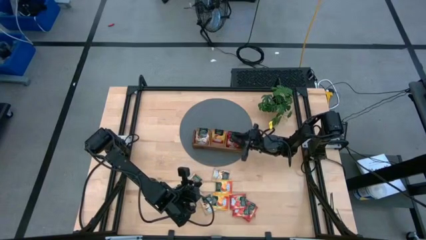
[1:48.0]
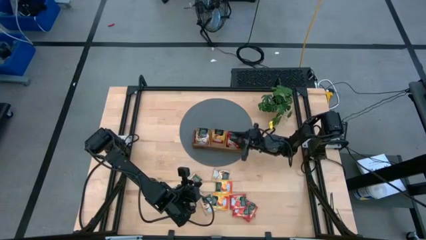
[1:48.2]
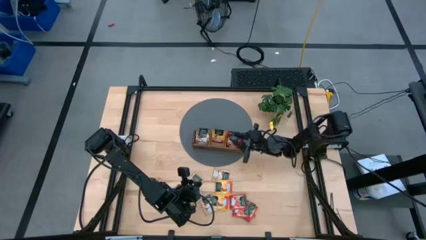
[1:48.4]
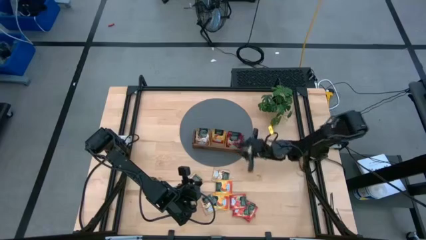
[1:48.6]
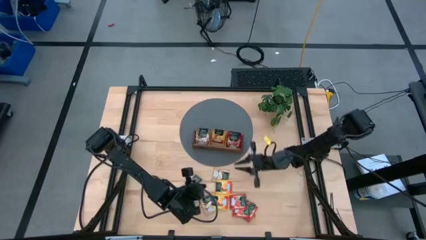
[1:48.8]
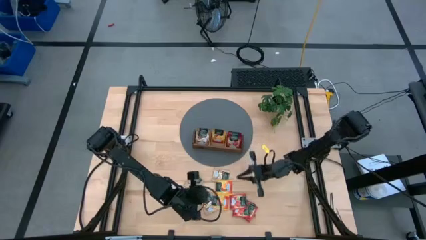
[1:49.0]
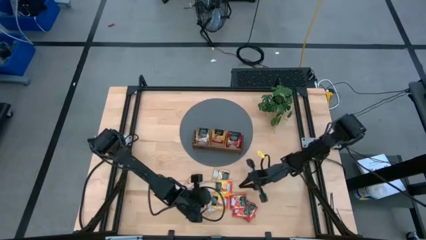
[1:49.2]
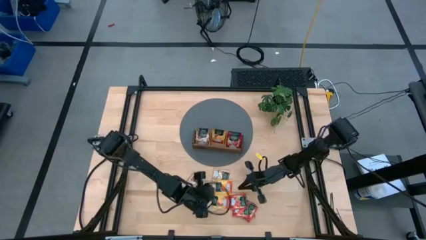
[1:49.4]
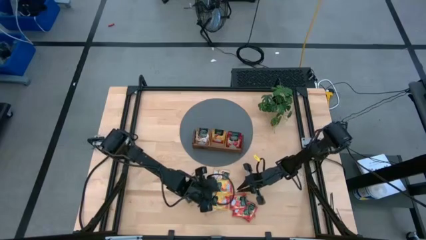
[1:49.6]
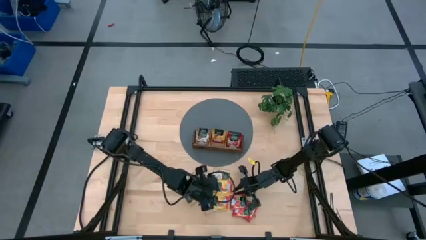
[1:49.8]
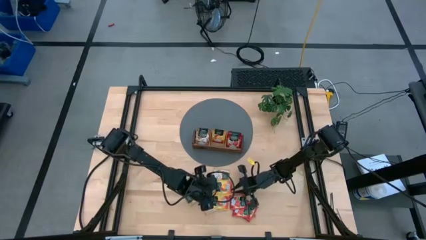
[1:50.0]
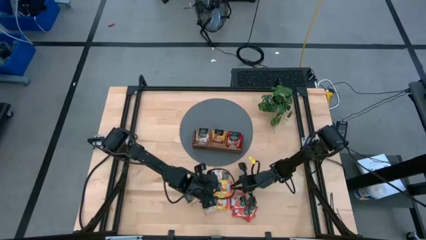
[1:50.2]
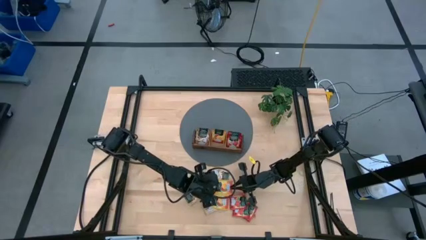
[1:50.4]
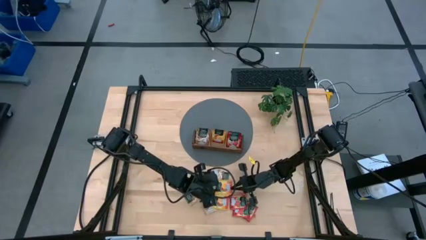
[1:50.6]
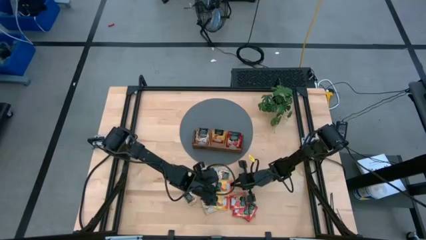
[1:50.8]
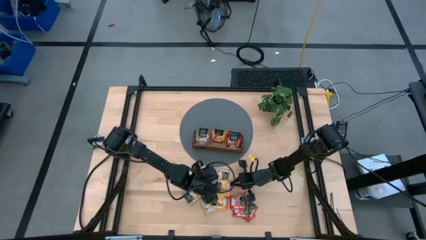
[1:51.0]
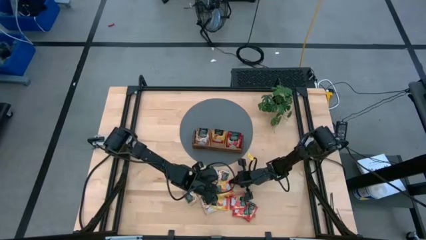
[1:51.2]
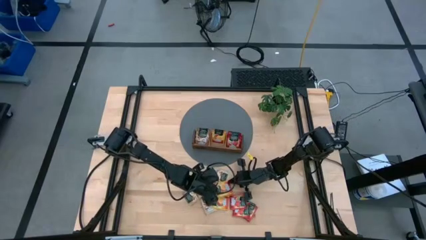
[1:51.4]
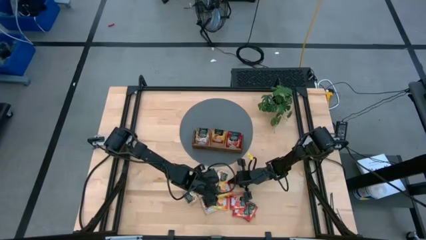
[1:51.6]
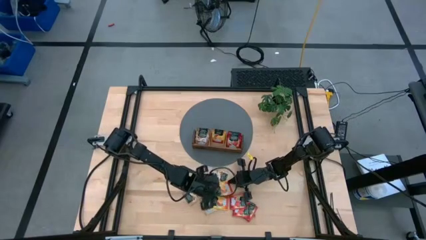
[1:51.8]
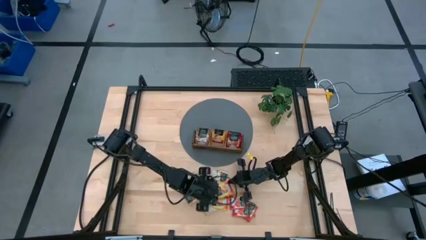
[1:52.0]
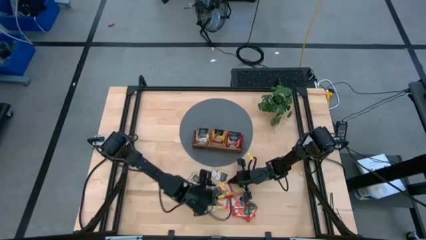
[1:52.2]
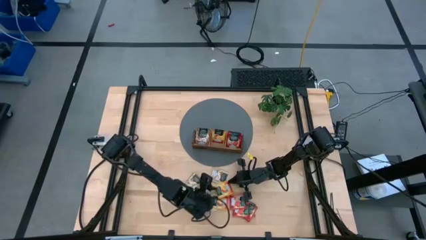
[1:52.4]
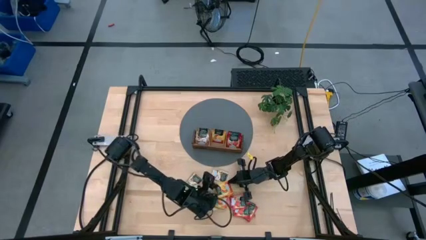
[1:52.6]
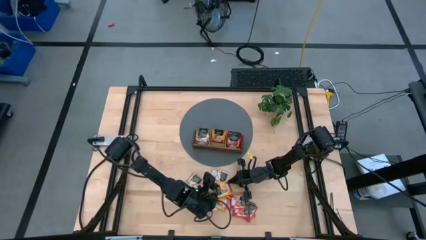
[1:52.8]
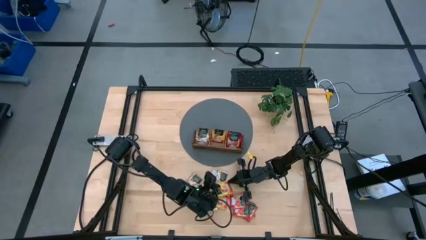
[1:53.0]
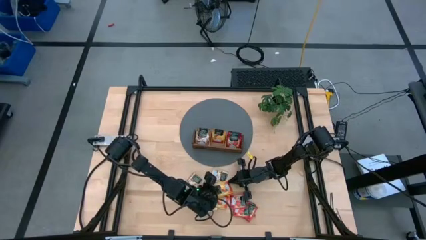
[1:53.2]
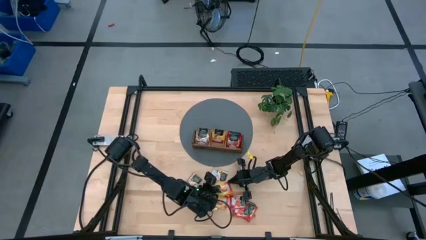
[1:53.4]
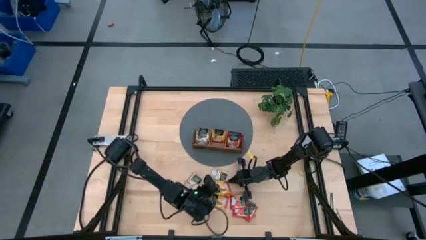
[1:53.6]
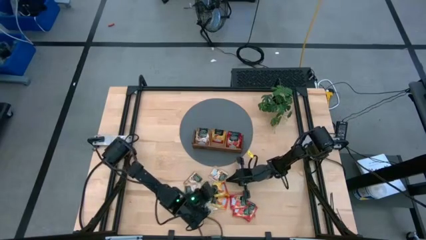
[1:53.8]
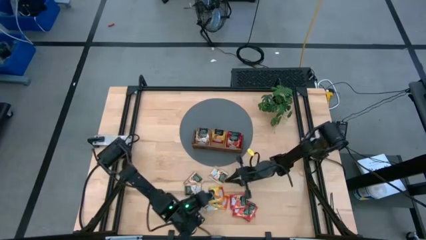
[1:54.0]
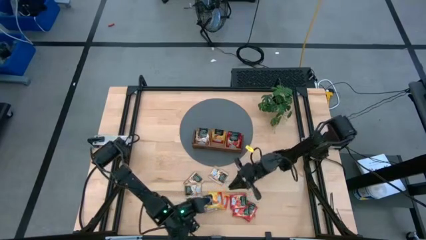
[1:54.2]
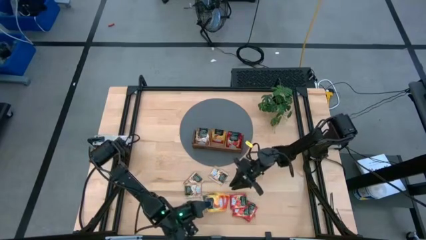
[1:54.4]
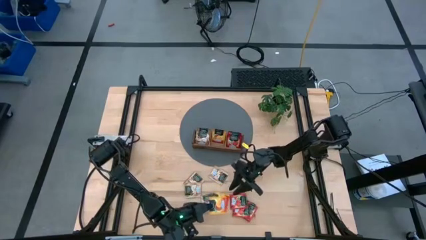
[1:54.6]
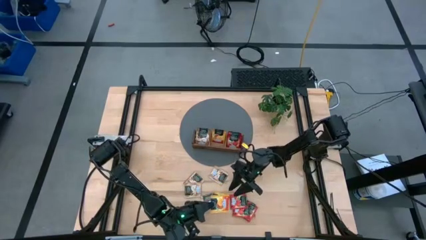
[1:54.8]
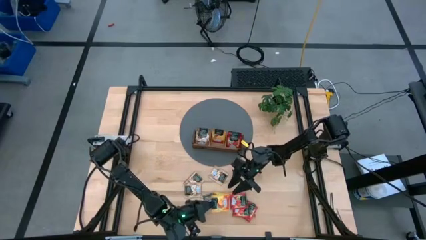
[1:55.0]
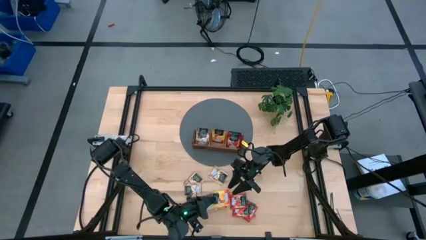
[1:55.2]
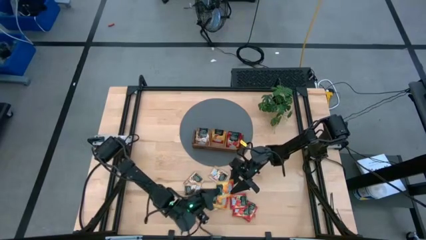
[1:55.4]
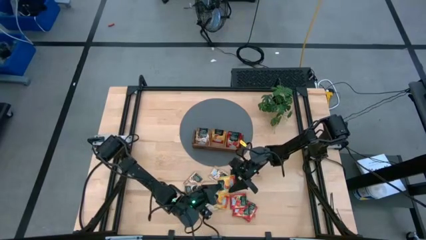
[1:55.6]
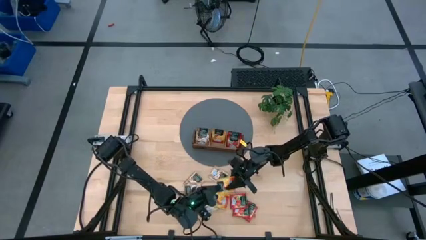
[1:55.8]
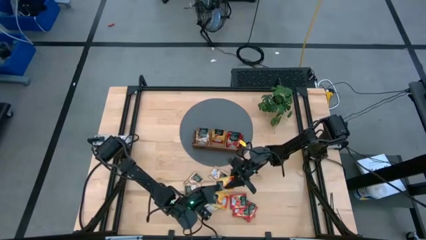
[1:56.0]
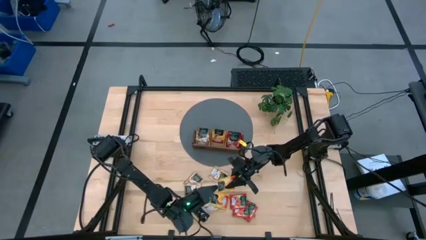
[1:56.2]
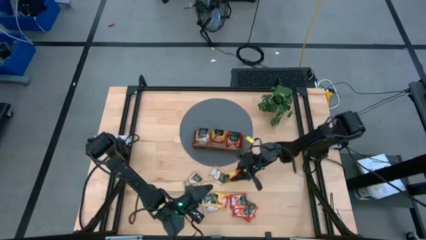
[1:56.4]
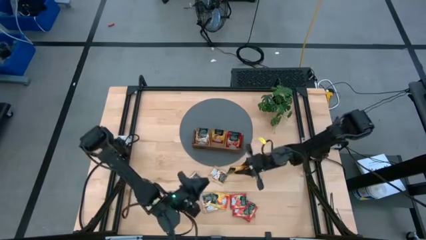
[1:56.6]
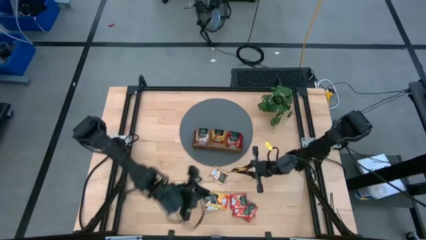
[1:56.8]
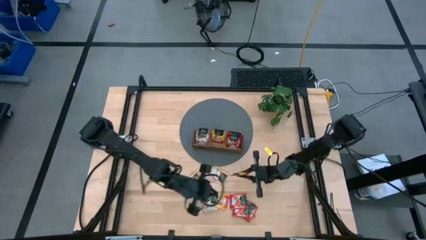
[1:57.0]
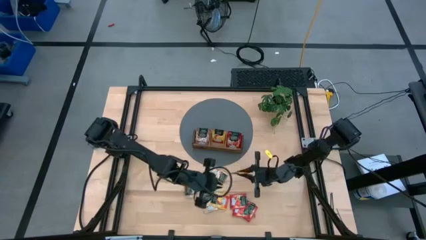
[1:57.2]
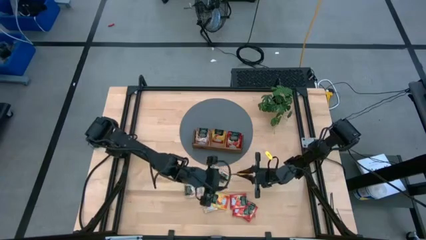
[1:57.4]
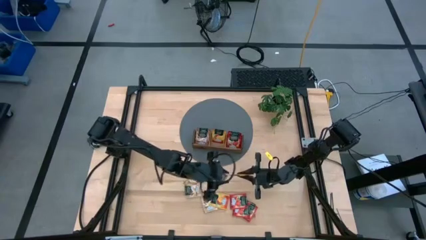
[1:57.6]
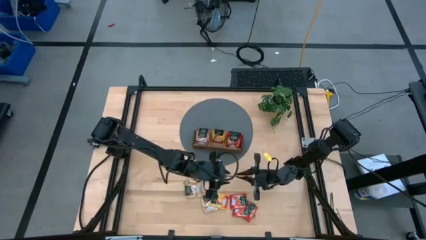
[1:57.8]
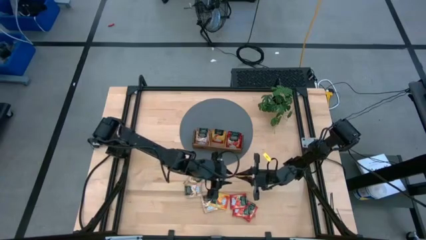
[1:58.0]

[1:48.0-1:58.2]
Task: Pick & Place Tea
Put the yellow tea bag into the middle section of the wooden organizer

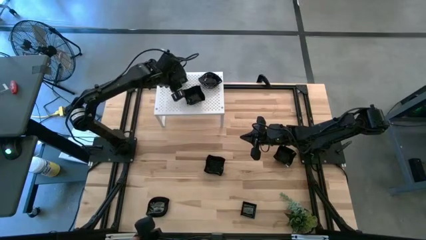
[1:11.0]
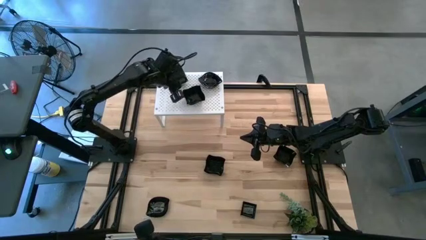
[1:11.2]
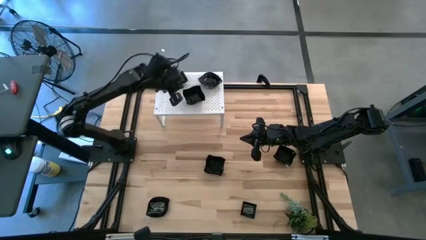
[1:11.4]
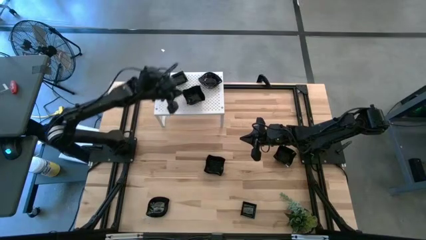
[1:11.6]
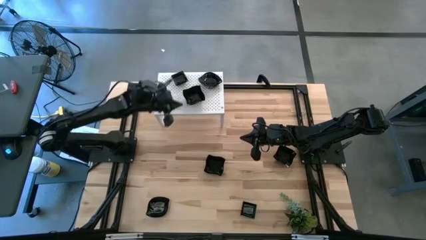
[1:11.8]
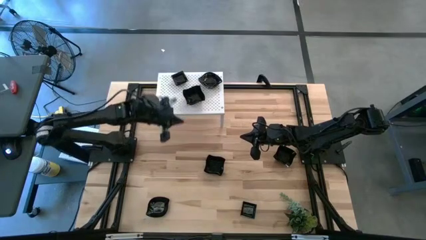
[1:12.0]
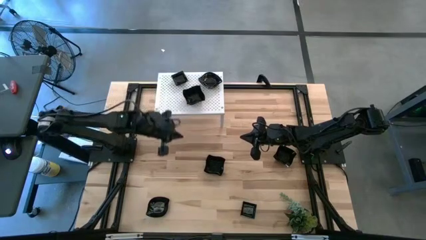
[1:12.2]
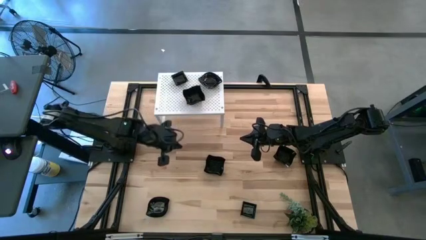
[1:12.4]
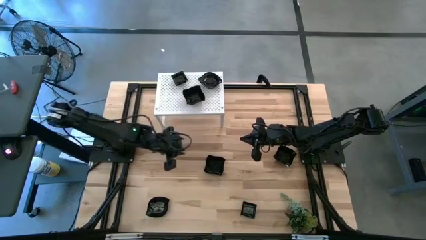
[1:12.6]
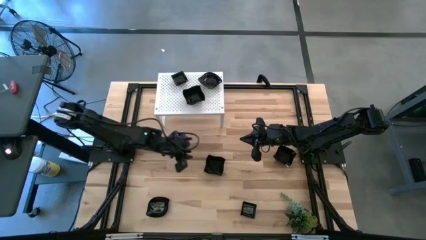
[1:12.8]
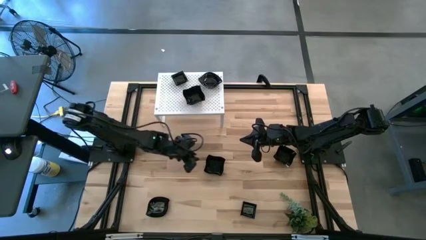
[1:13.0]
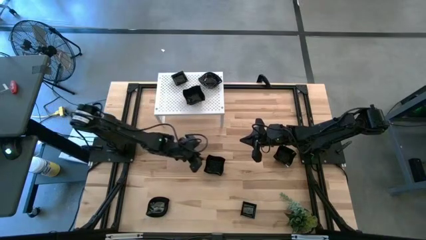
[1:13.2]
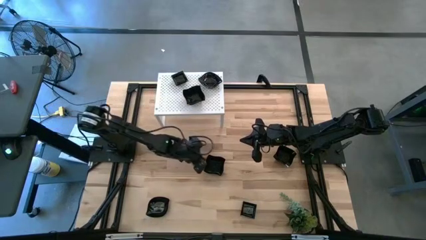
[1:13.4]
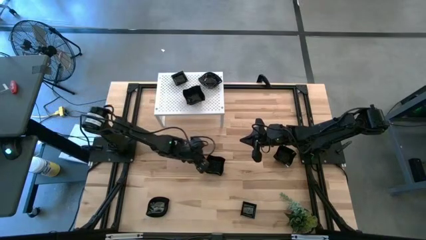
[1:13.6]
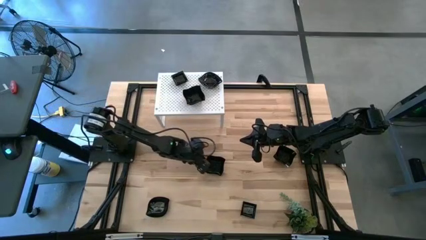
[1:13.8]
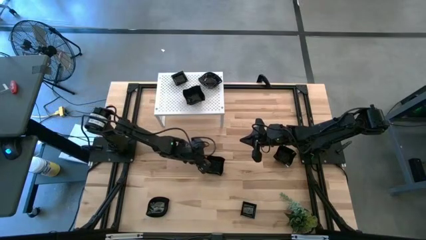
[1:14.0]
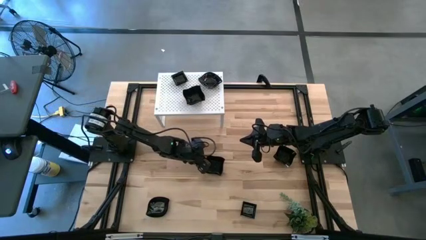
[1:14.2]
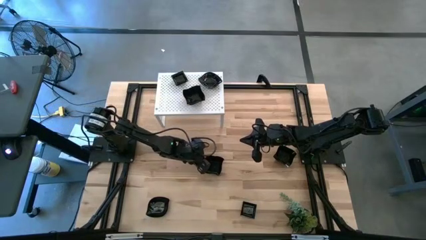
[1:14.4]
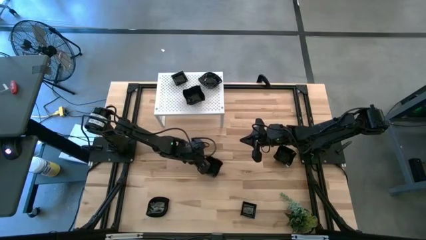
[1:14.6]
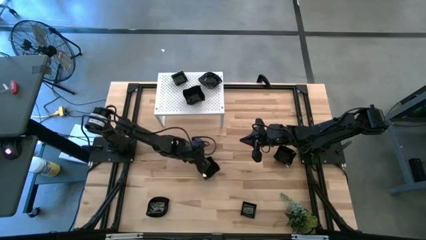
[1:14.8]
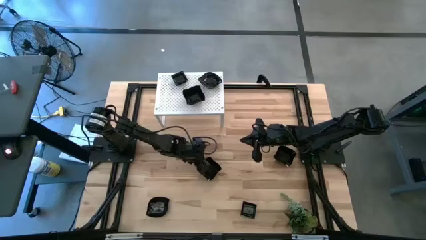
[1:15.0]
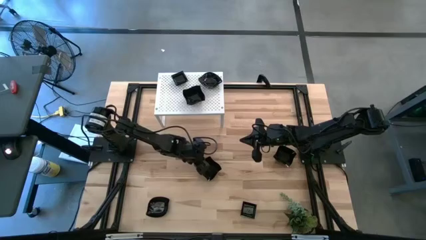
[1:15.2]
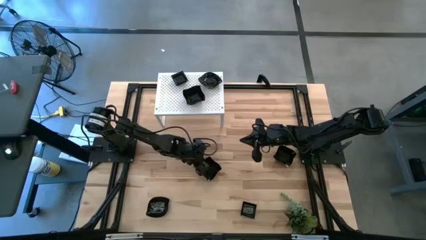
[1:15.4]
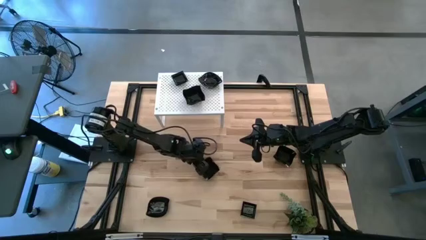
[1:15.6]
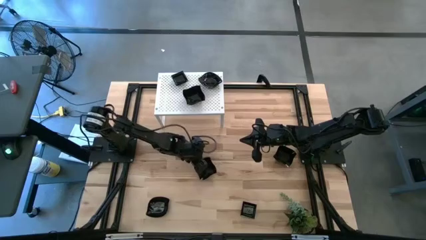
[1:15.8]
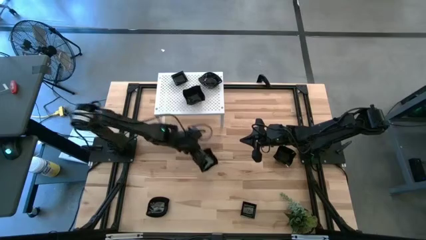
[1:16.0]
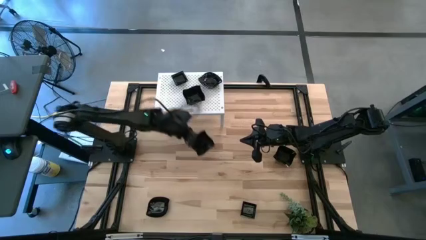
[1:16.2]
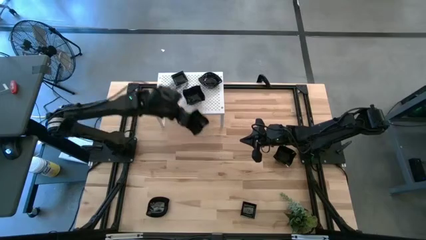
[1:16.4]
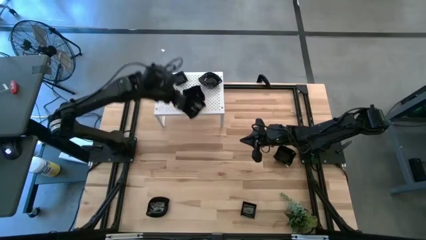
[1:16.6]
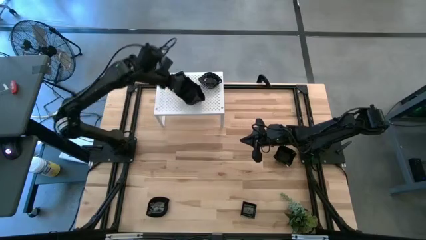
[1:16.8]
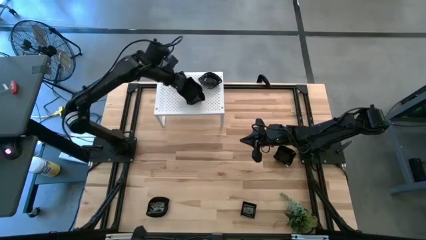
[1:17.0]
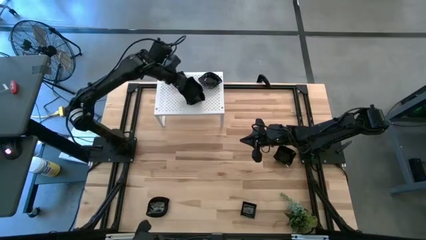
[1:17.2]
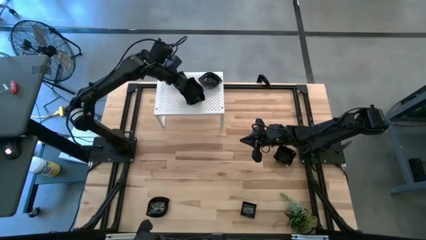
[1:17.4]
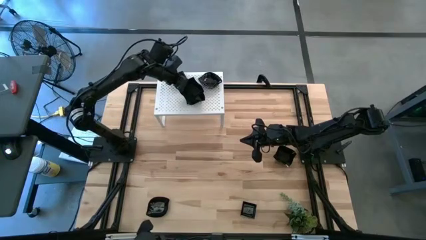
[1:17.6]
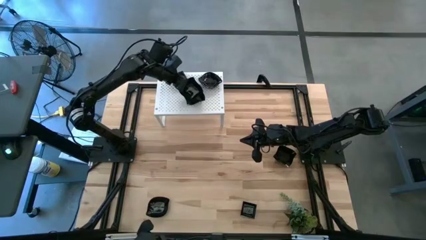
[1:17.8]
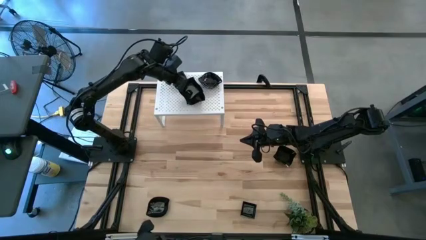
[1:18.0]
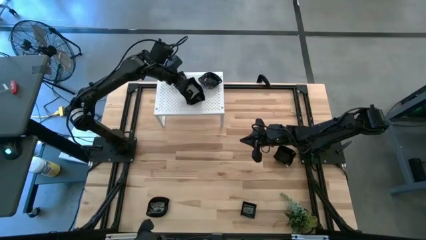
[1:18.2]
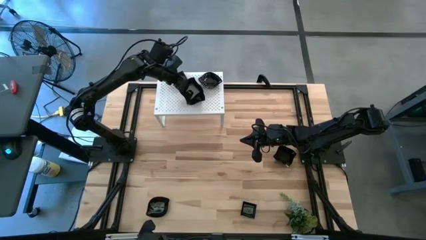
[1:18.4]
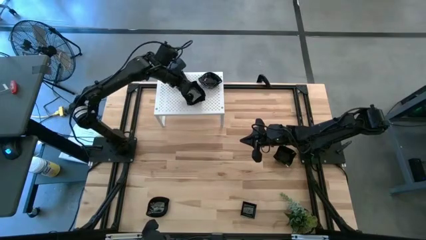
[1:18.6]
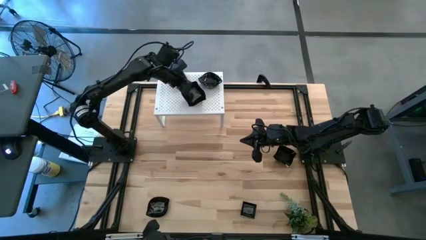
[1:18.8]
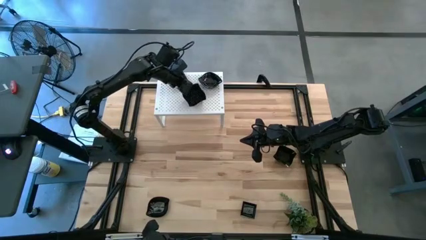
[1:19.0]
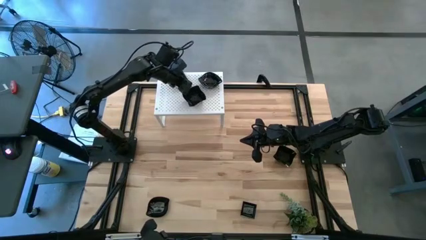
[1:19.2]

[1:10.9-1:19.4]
Task: Pick & Place Mini shaped plates
Stack the black distorted square plate on top of the black distorted square plates on the shelf
